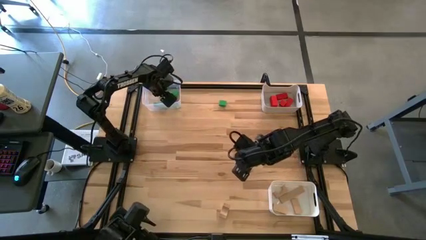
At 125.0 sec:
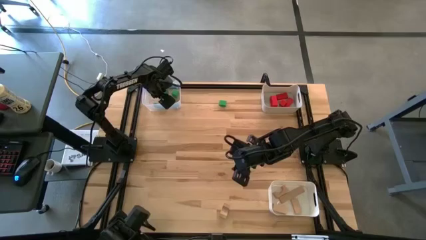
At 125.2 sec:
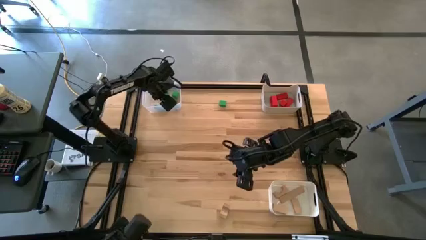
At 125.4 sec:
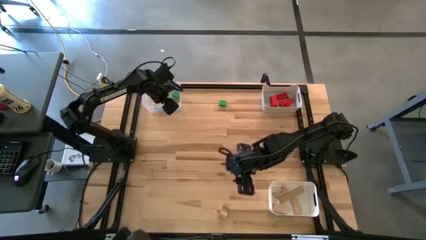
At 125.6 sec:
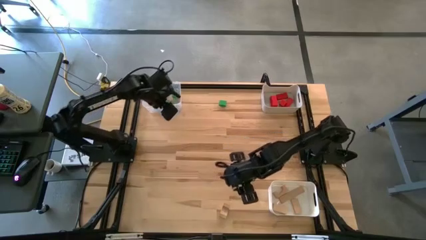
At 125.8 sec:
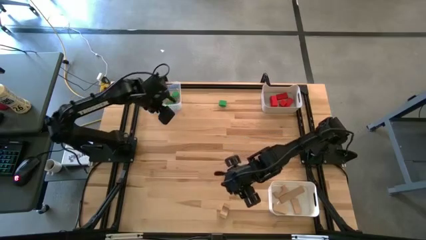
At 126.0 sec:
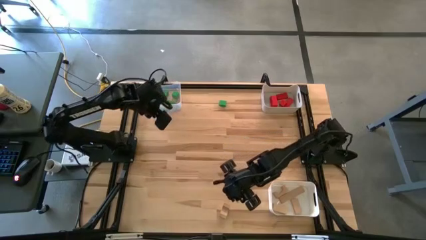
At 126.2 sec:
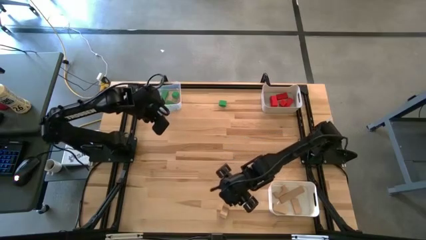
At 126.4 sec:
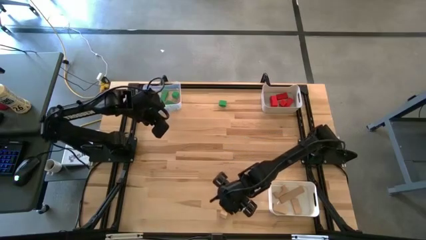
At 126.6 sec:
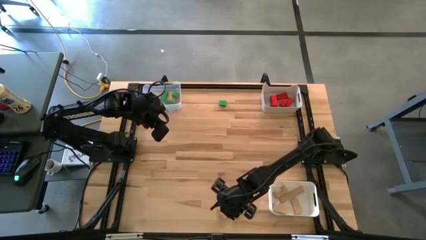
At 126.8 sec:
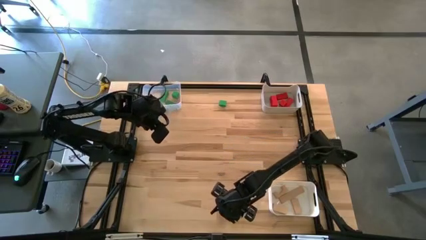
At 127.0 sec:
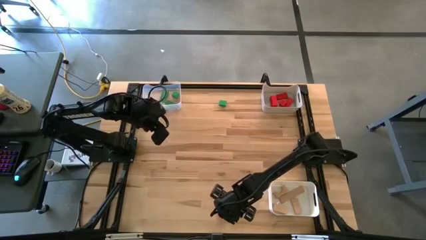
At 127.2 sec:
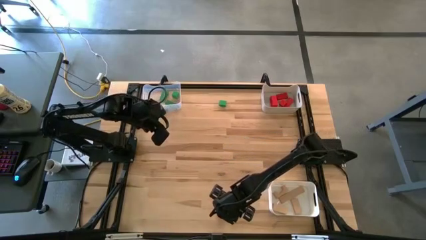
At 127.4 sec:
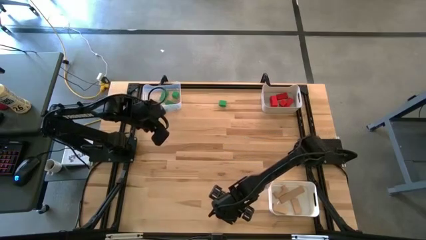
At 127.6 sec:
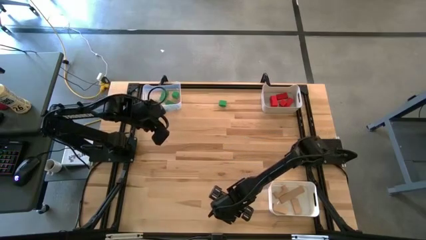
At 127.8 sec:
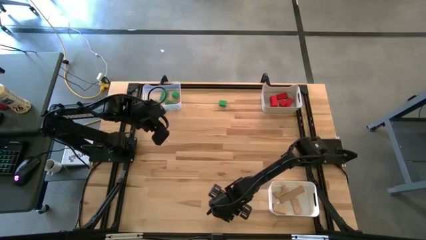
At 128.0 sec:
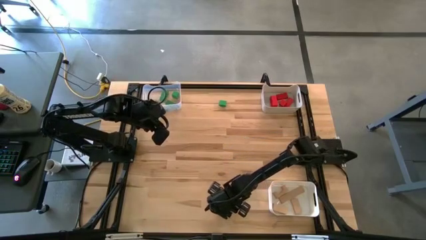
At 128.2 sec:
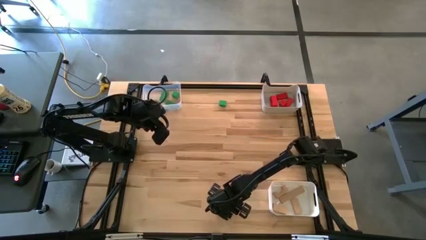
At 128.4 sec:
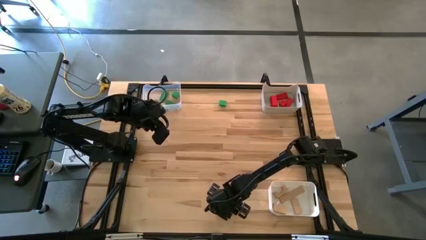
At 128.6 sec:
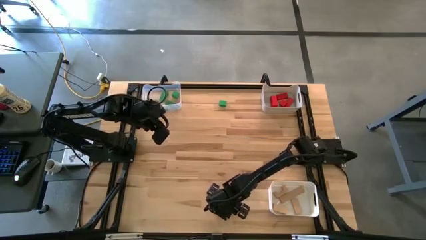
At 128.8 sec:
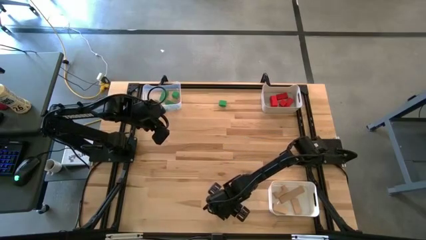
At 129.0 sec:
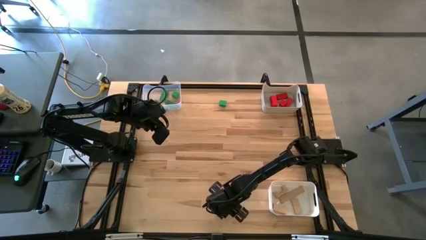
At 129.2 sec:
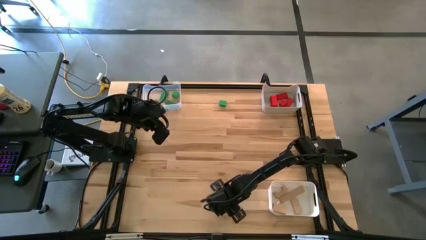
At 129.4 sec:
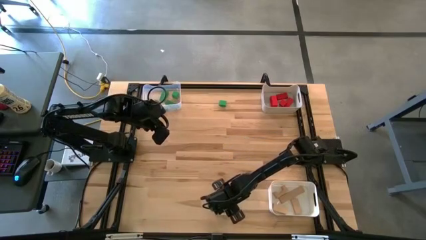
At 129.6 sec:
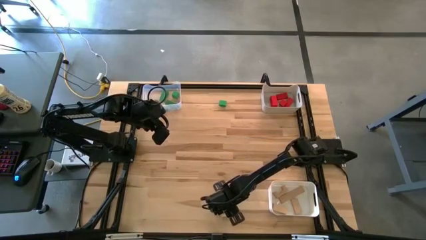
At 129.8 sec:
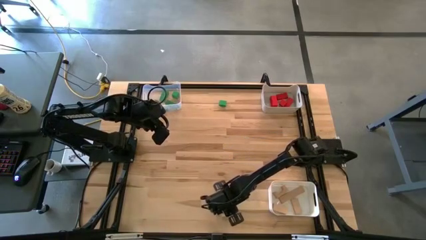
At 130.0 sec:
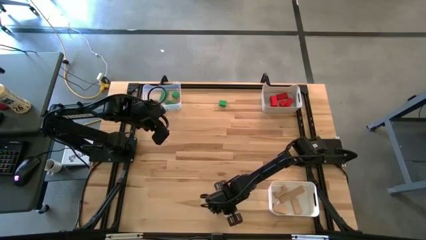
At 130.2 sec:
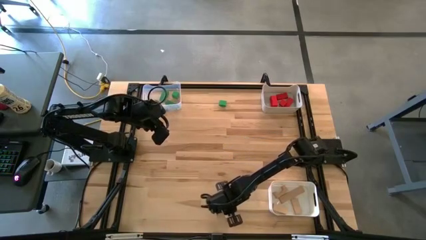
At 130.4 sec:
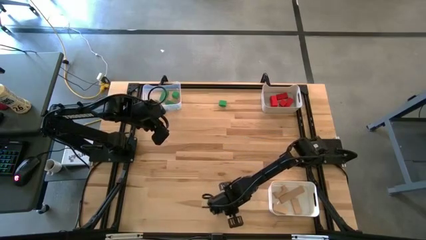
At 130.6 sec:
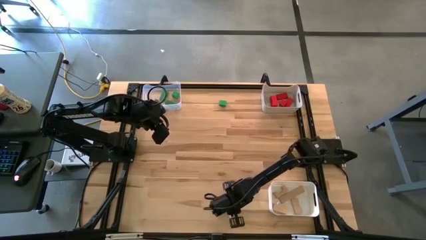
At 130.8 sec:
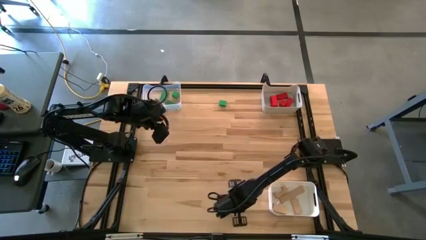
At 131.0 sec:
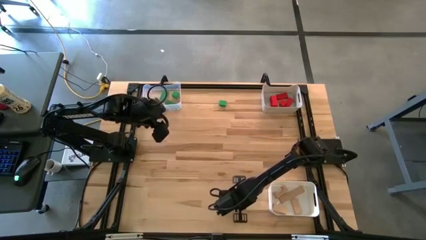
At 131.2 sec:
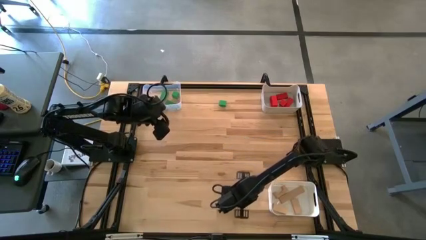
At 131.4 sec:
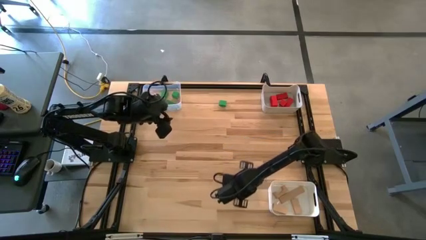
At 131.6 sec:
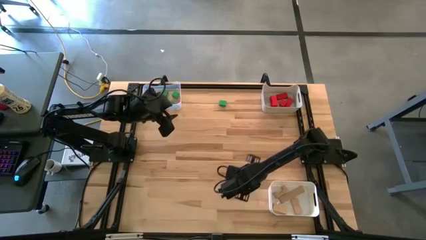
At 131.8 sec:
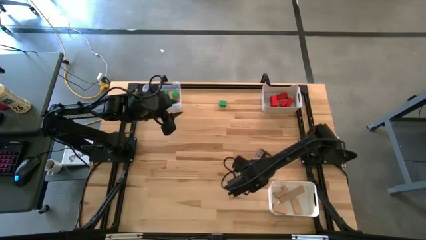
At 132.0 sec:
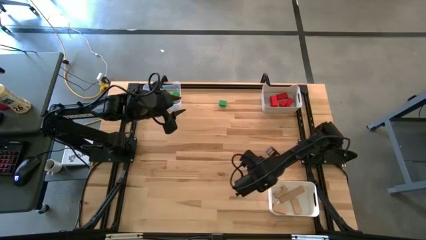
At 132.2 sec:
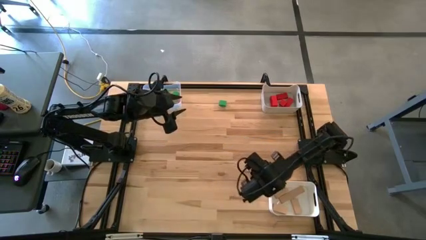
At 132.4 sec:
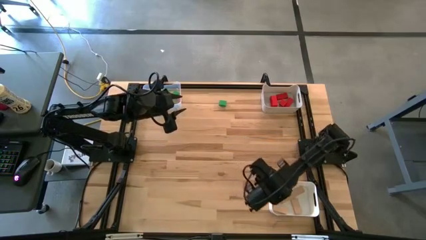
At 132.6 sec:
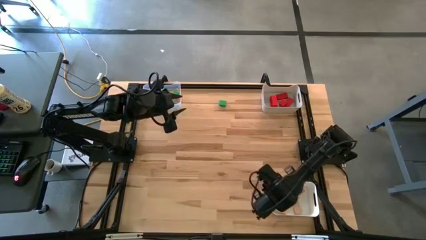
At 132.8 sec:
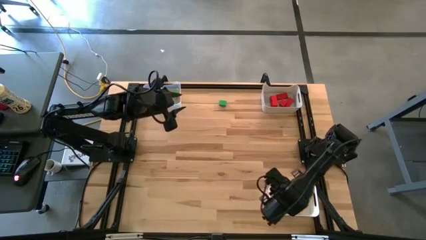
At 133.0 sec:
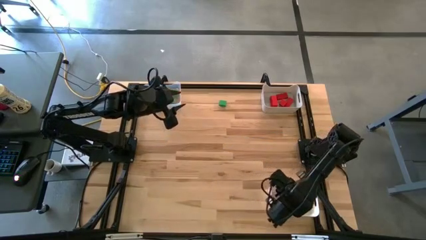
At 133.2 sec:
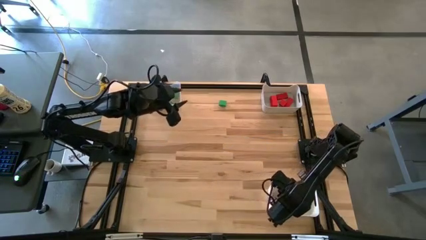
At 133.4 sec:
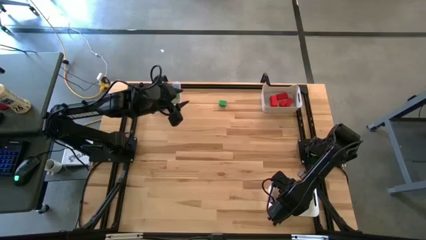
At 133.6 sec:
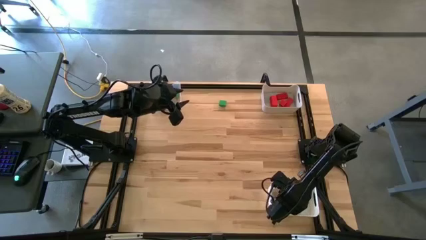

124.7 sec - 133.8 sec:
Task: Sort & place blocks by color
Put the brown block into the white bin

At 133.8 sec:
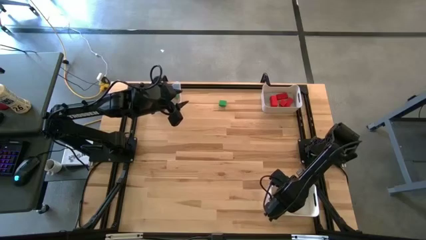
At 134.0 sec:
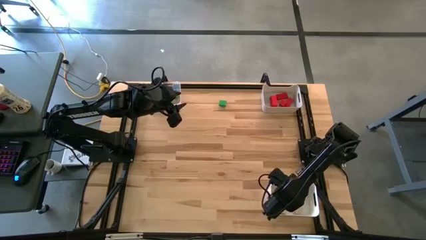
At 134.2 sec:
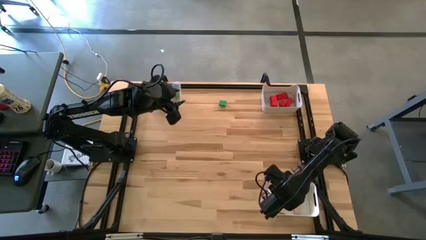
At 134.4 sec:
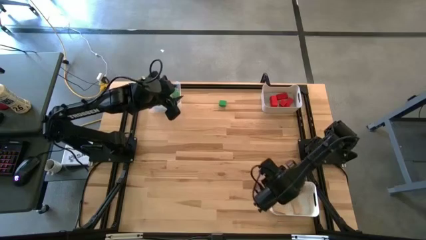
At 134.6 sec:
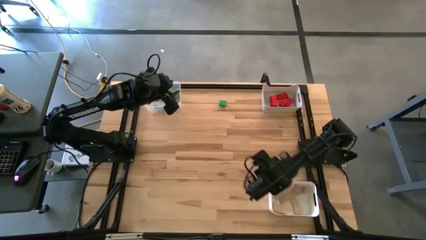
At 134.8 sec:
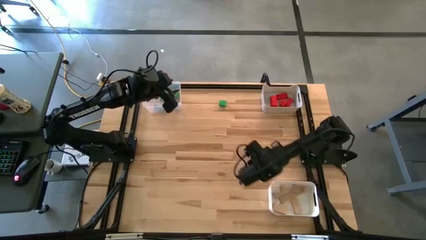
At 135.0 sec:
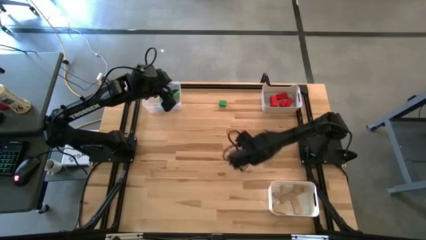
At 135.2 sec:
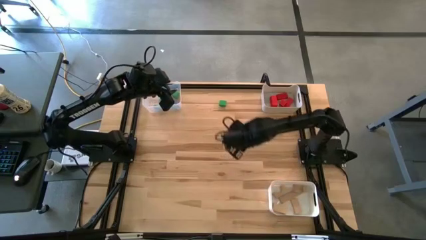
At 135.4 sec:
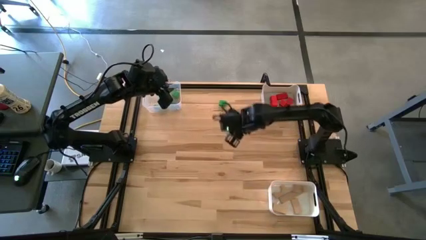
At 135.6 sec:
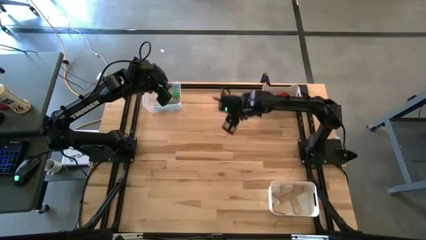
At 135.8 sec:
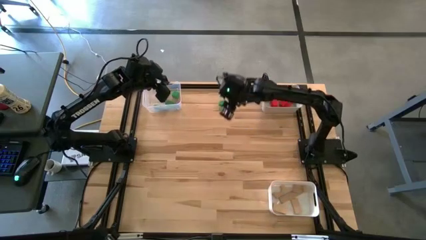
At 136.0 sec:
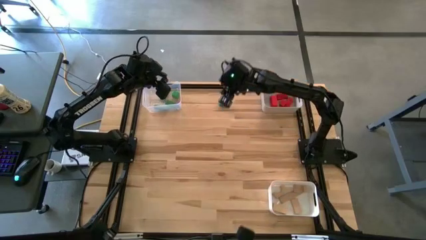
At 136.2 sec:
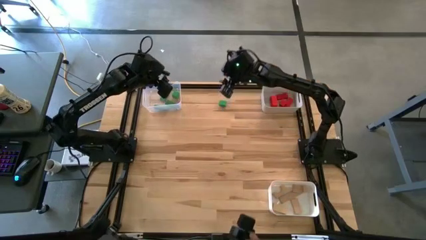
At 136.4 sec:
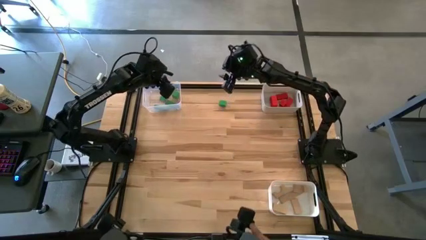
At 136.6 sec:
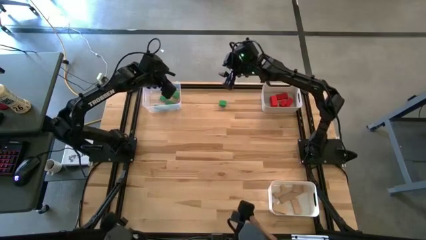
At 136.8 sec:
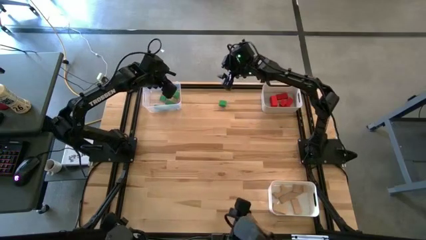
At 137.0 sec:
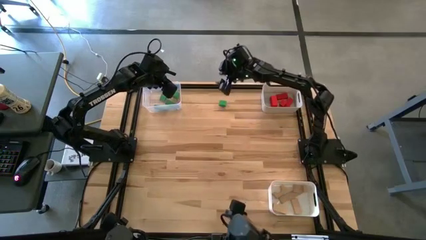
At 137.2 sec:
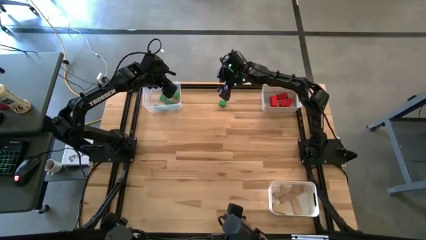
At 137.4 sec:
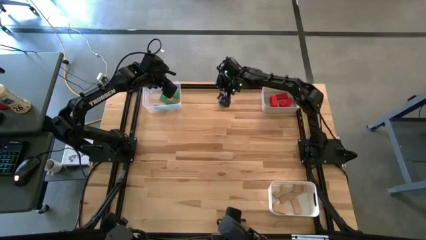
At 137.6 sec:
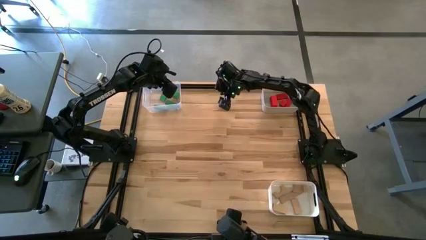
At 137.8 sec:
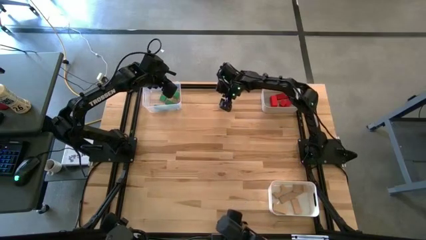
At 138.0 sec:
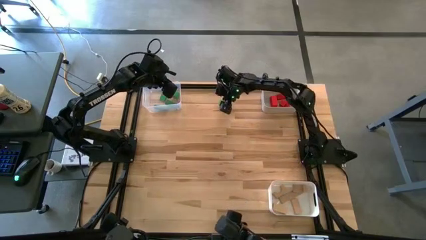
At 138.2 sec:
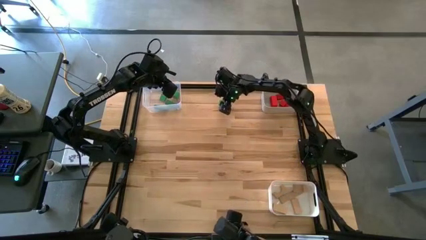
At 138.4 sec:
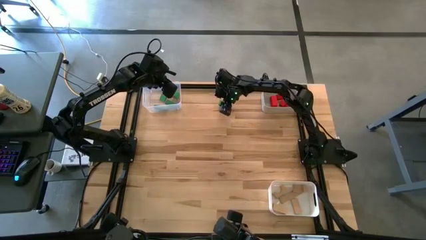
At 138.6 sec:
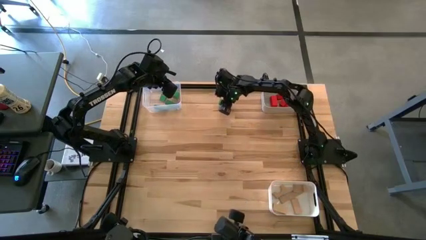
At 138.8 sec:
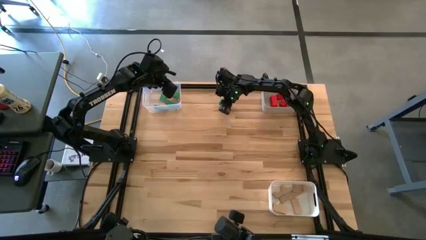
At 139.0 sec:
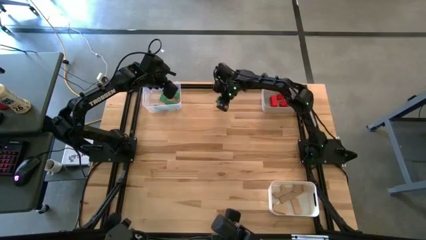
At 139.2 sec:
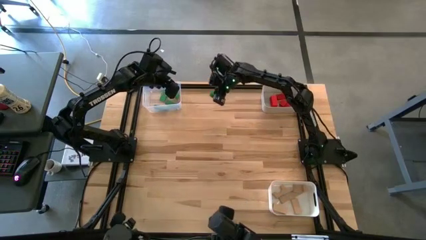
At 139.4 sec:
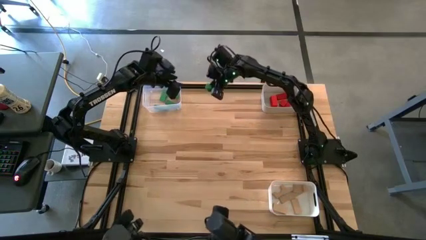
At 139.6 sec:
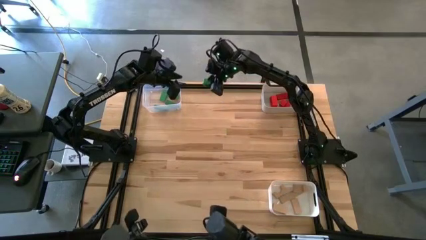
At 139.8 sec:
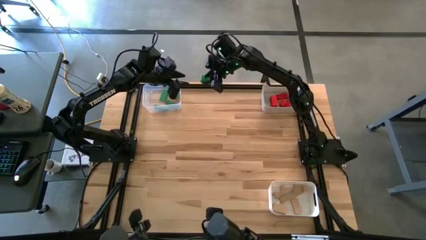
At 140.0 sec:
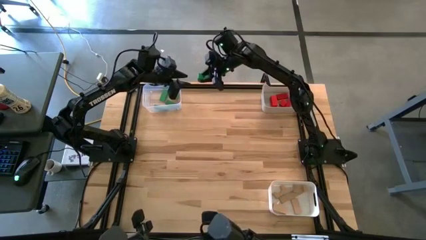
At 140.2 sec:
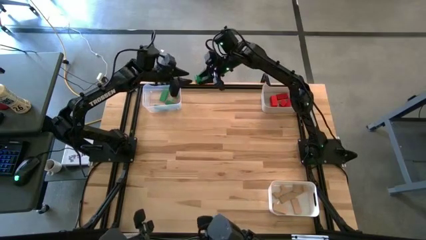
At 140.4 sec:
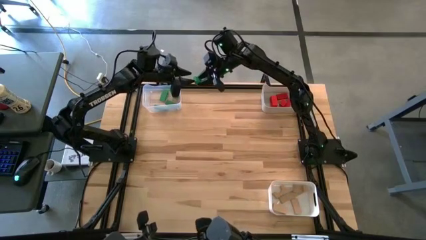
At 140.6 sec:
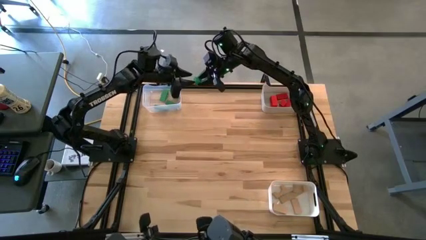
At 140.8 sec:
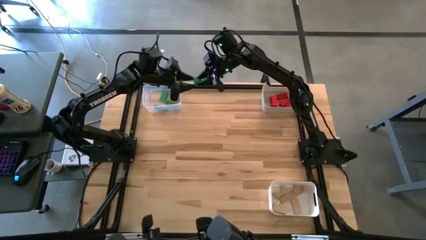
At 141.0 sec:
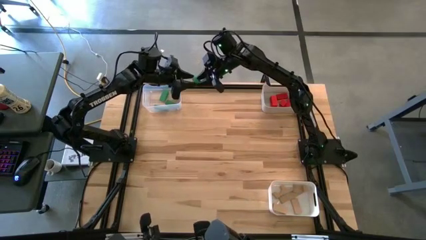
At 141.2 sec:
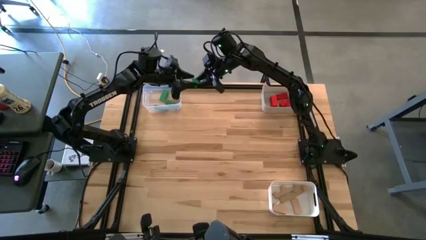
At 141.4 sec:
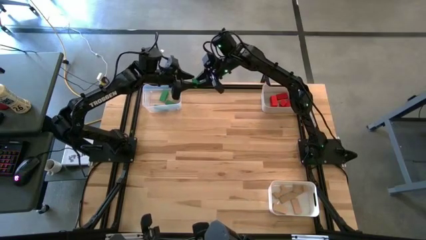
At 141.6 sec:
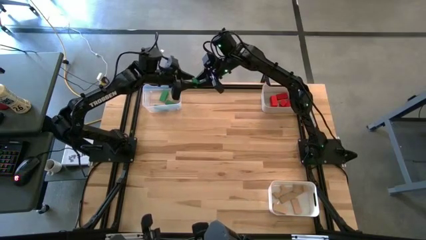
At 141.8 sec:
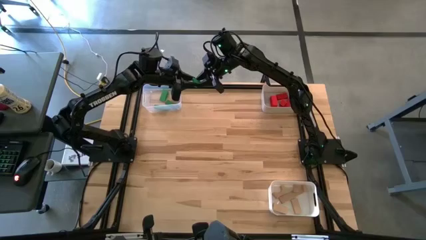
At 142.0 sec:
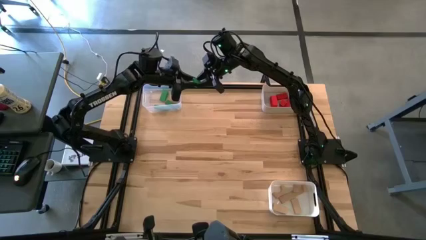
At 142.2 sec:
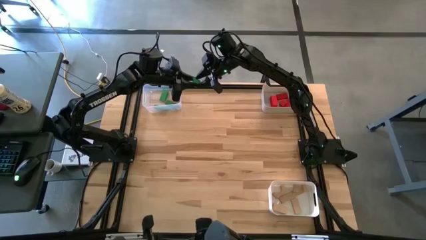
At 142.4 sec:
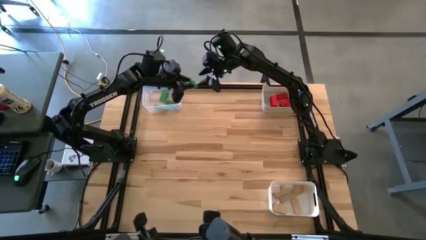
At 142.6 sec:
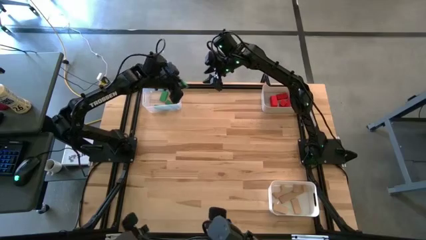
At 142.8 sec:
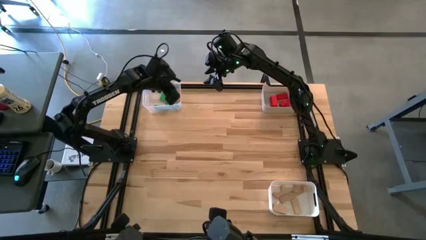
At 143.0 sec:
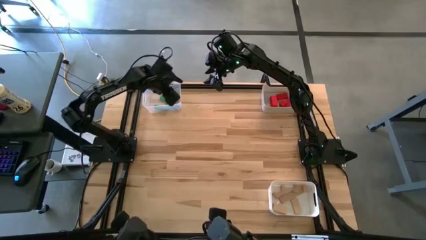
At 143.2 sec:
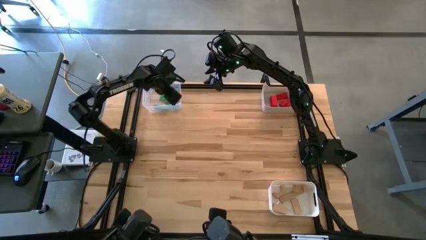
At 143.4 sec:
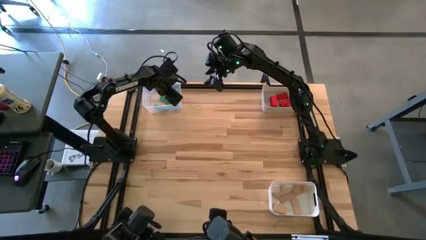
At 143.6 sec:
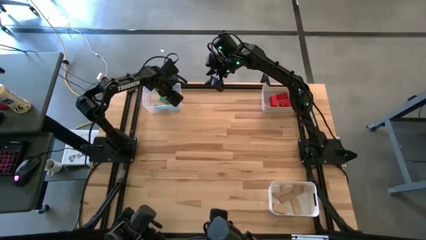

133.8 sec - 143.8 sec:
Put the green block into the transparent bin
